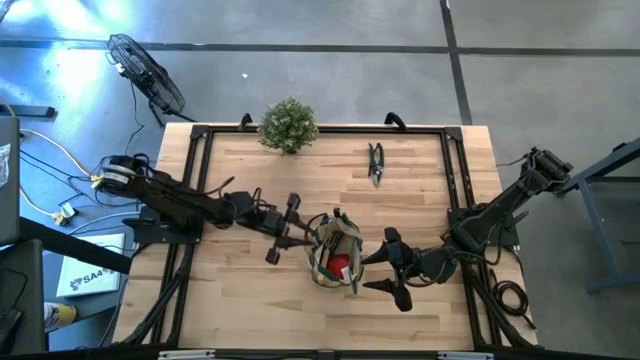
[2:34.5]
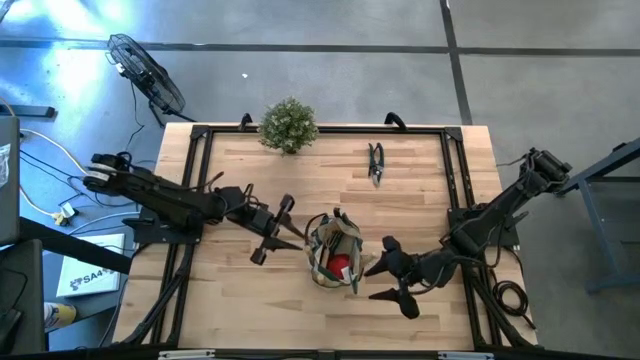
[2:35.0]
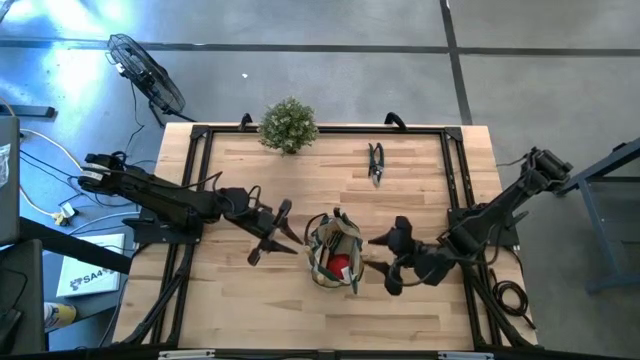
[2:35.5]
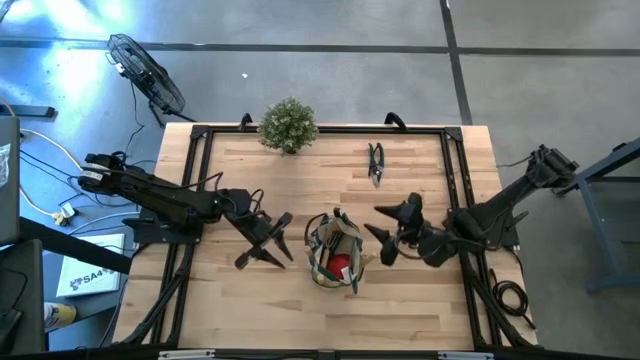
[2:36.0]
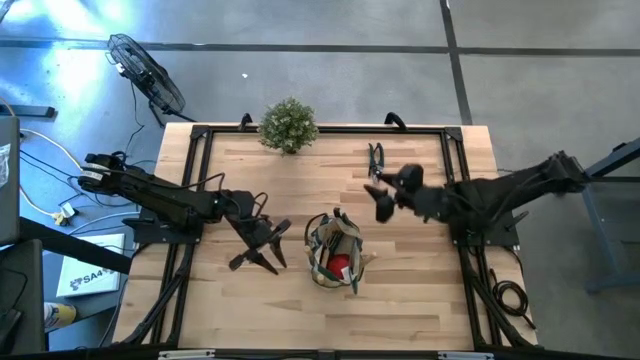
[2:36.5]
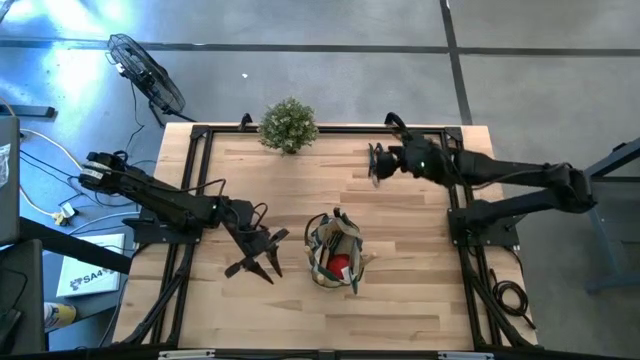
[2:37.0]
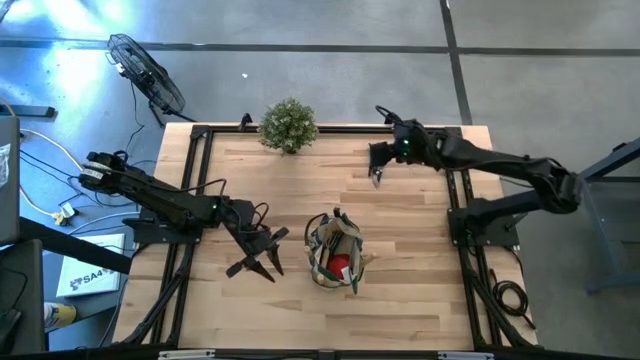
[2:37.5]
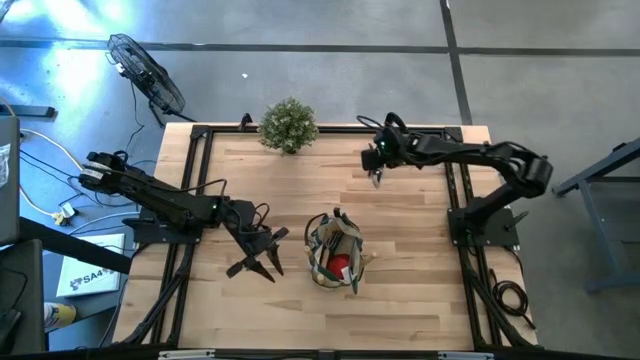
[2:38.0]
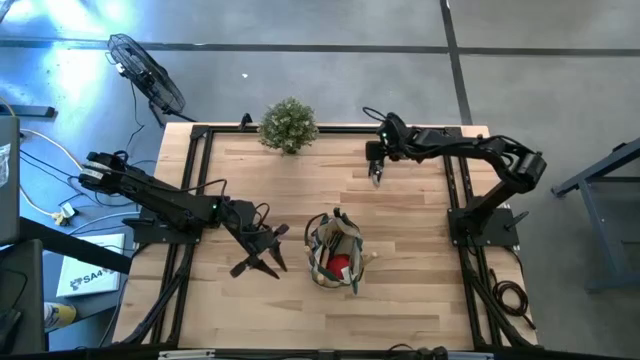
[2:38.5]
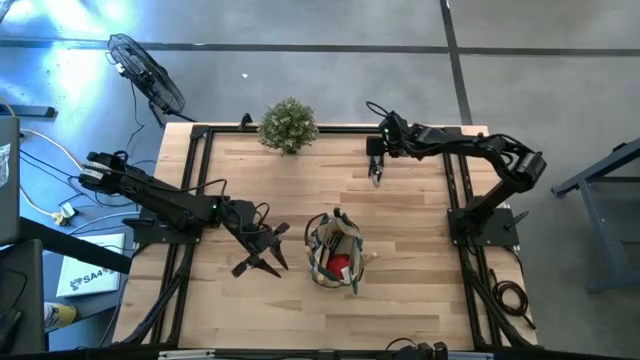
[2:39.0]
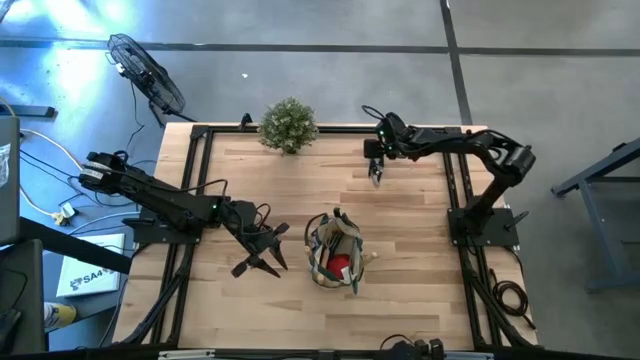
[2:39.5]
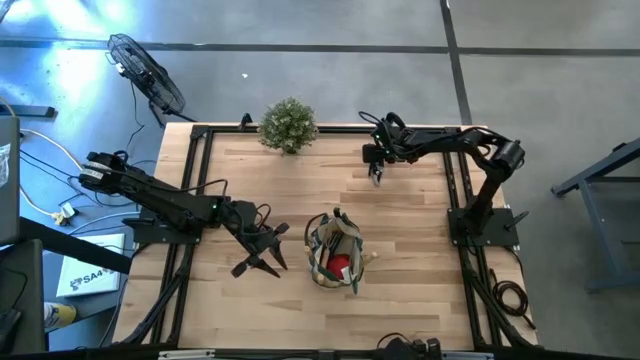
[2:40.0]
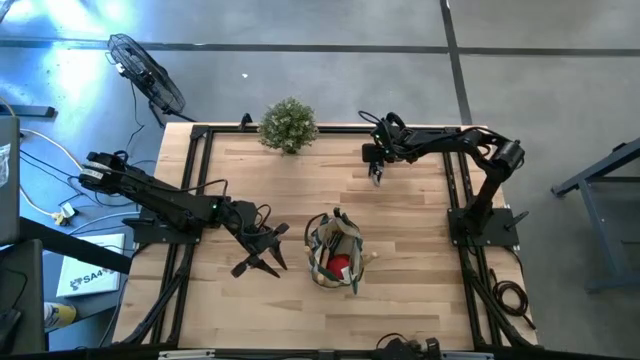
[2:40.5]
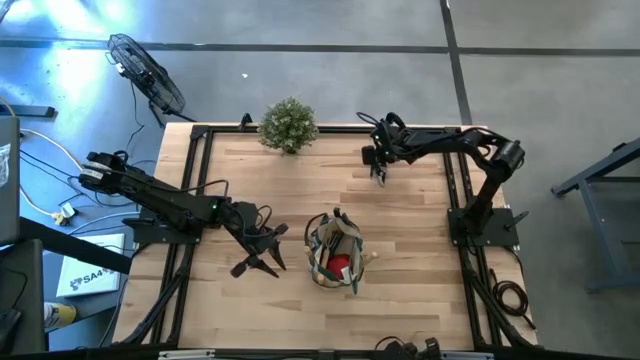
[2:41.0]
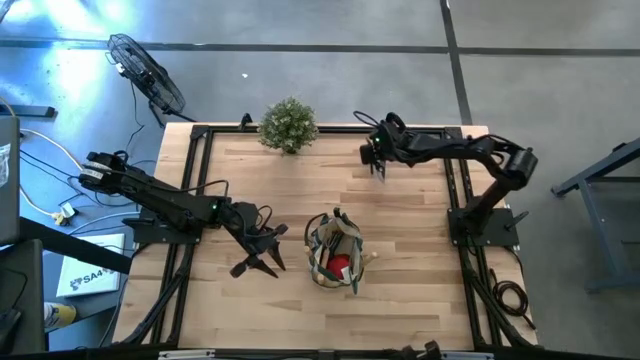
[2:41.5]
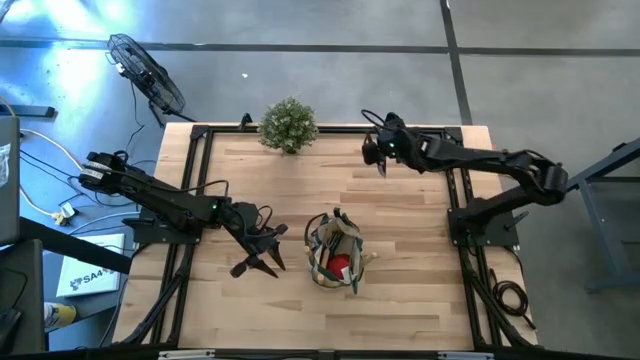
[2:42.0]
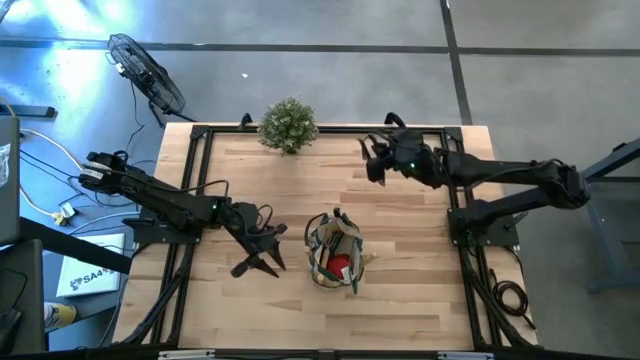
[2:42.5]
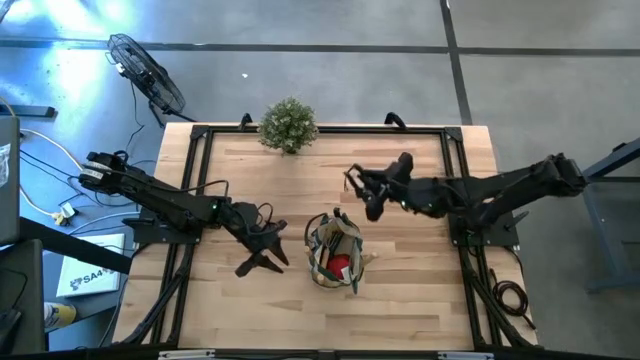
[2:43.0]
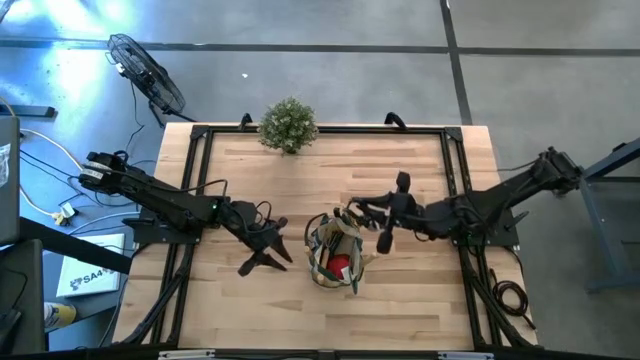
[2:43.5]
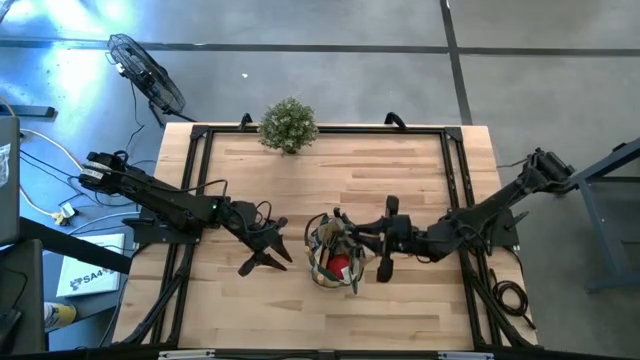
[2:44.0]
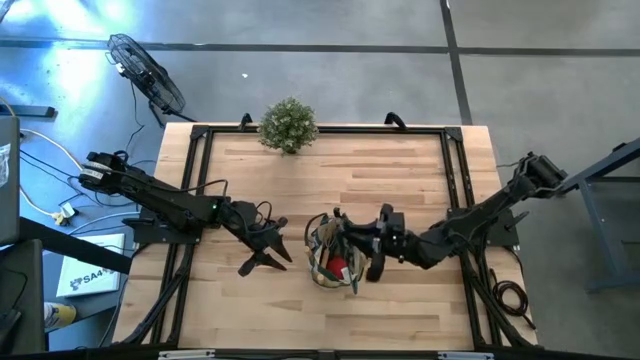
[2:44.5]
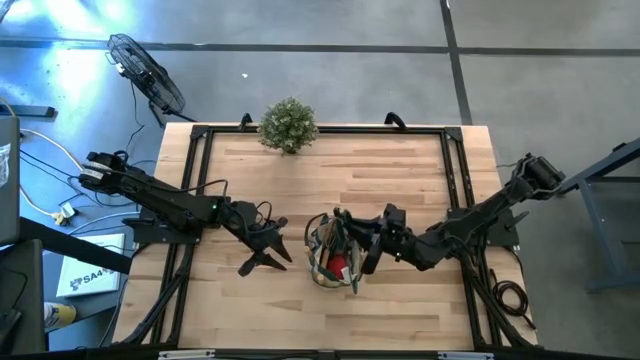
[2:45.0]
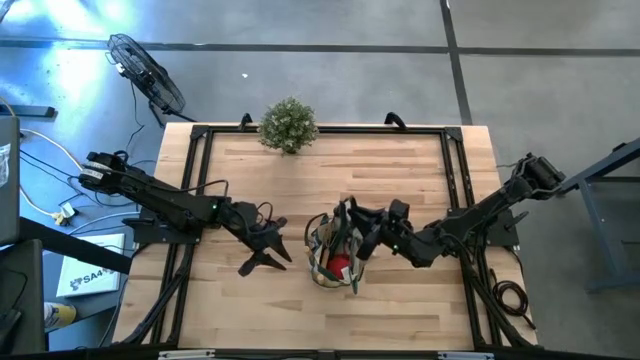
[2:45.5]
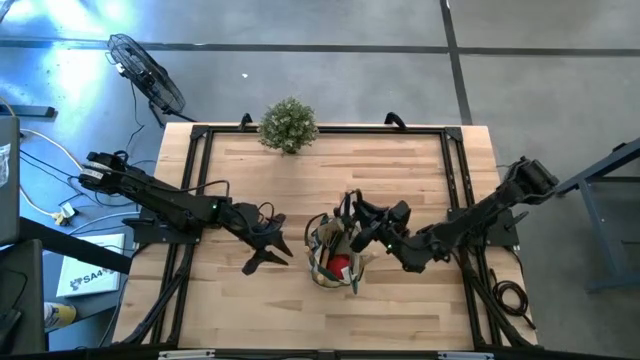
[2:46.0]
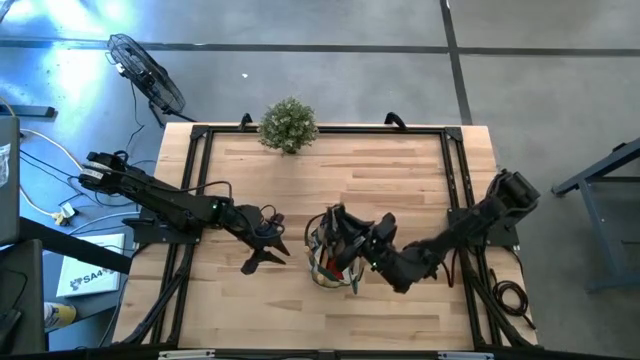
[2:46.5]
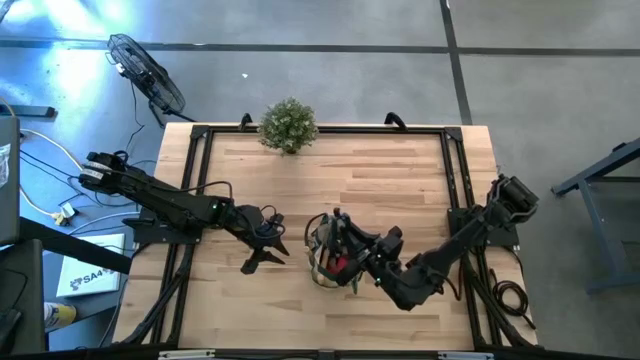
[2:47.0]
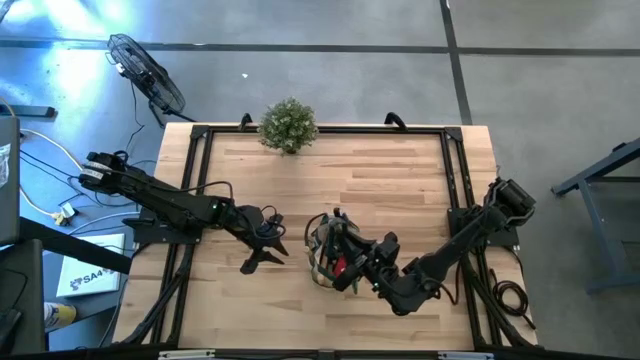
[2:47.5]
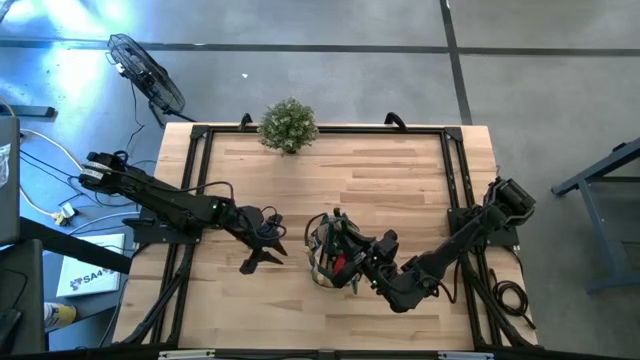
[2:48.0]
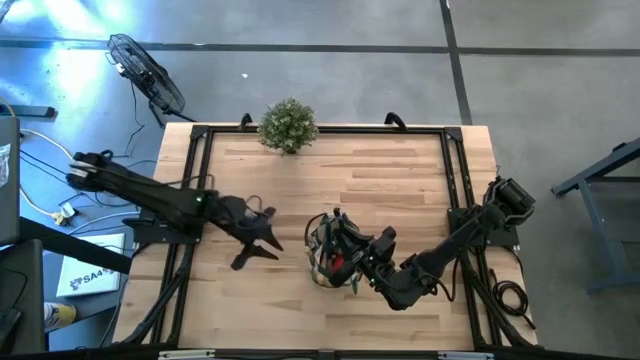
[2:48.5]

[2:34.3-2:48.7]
Task: Pick & Place Garden tools in Gardening bag
Put the green scissors into the green bag

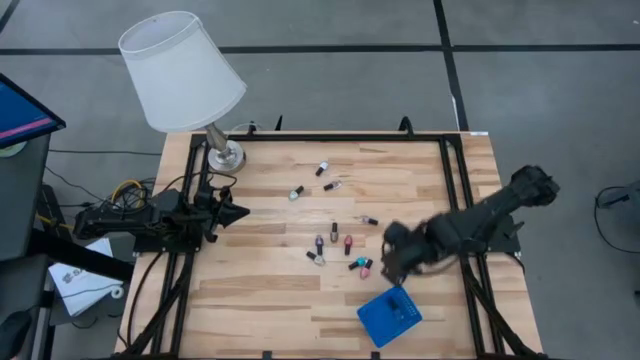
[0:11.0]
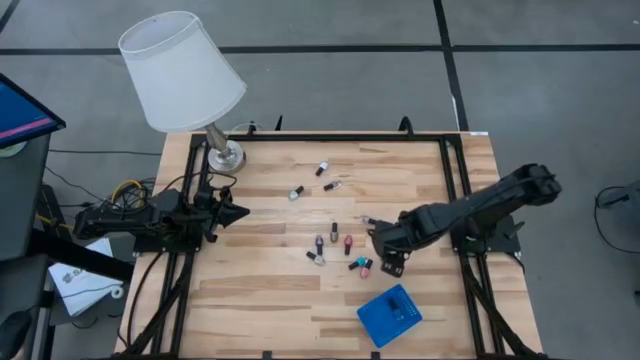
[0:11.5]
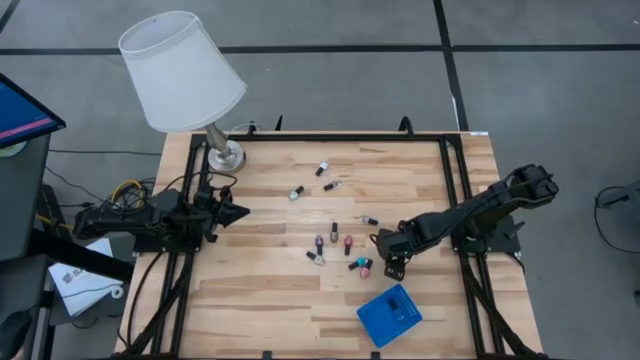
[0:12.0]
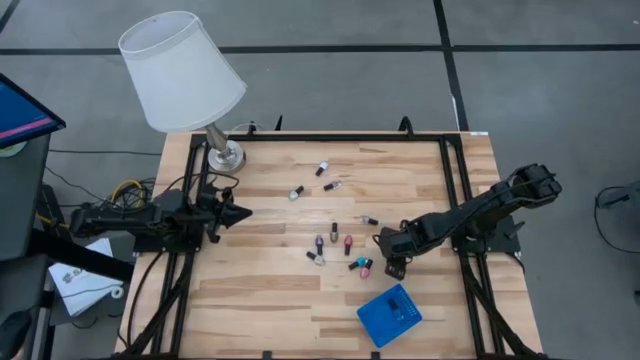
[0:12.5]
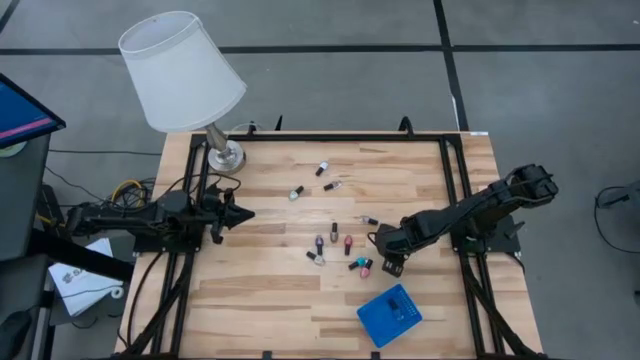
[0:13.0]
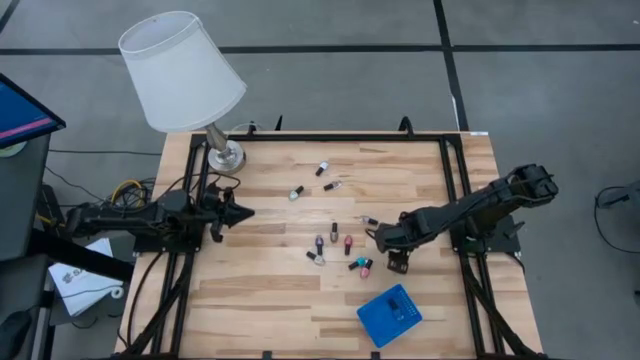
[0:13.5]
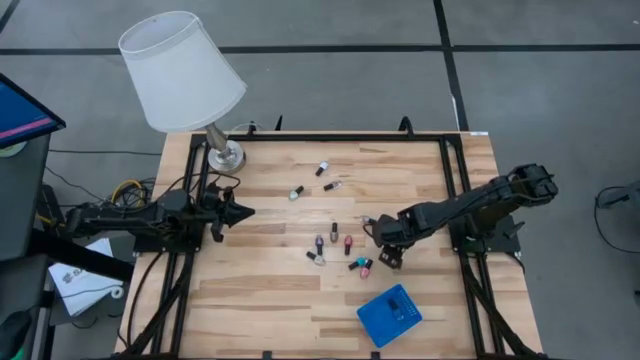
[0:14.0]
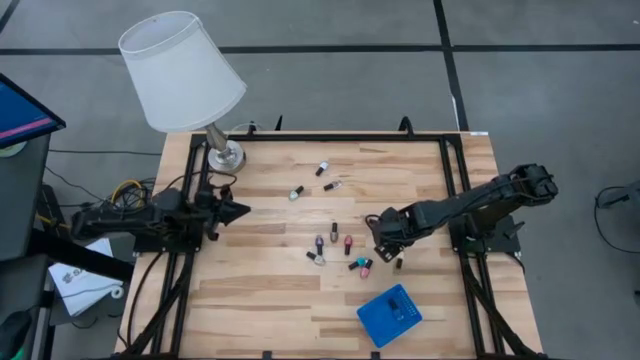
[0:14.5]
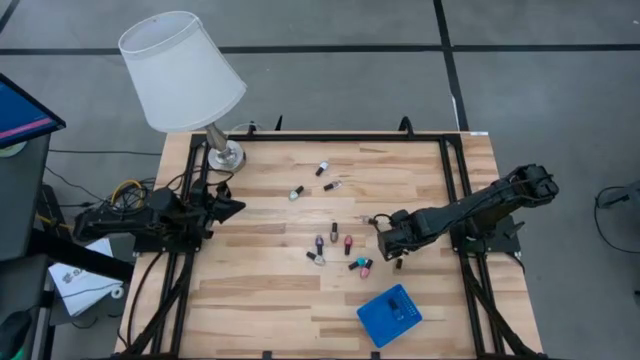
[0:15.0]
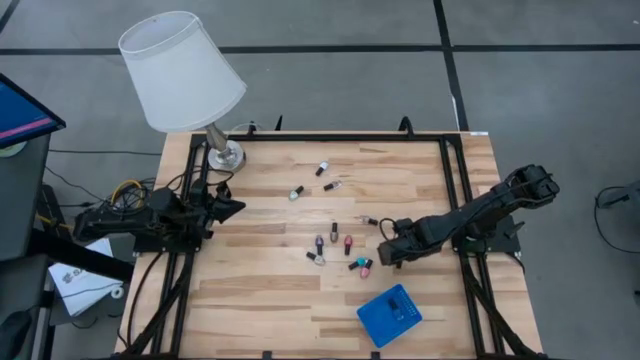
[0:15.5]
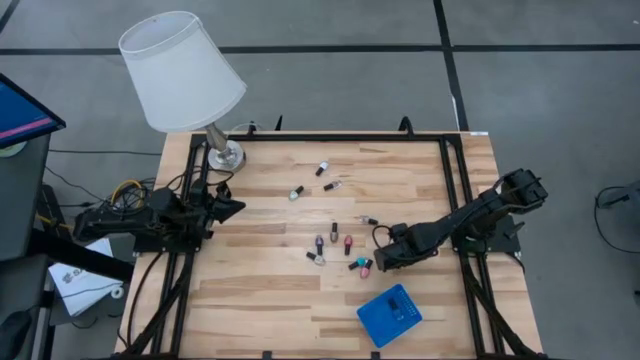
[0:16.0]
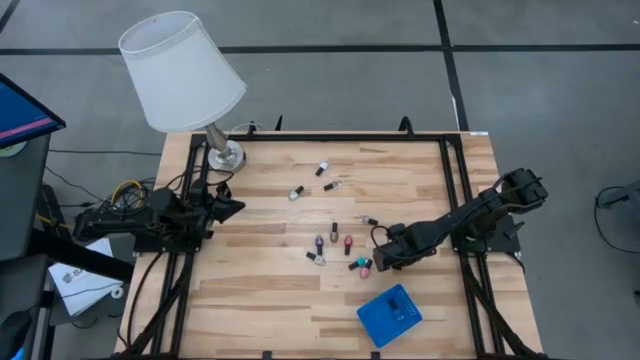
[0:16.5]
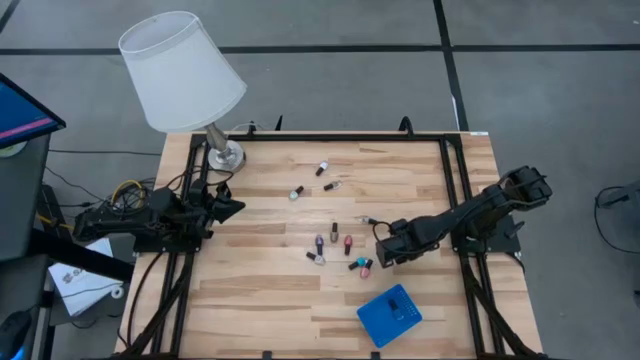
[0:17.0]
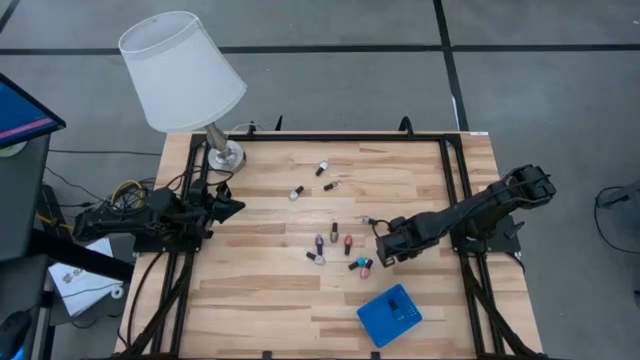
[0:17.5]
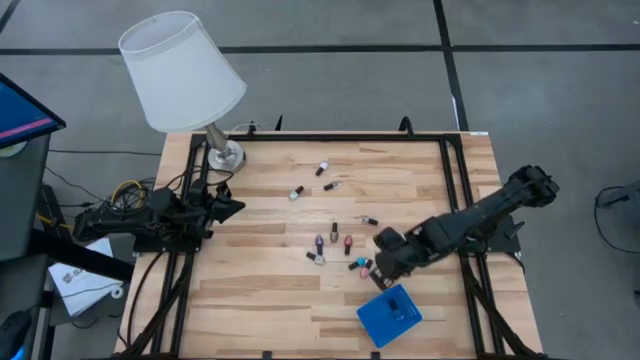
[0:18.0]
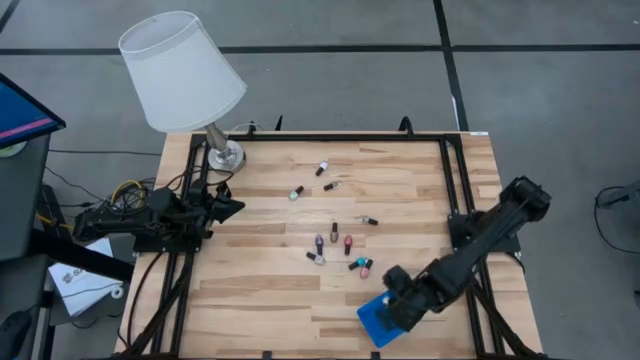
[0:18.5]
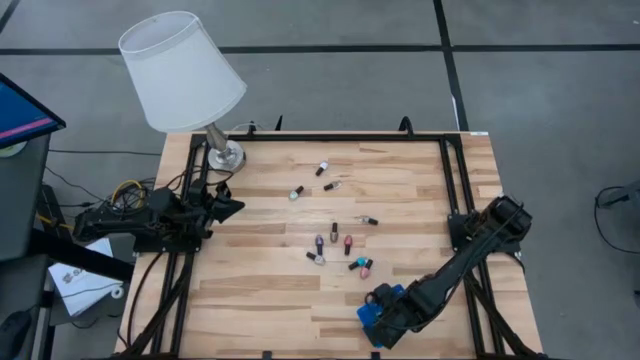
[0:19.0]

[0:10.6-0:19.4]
Task: Pick & Place Nail Polish
Put the yellow nail polish into the blue bin
